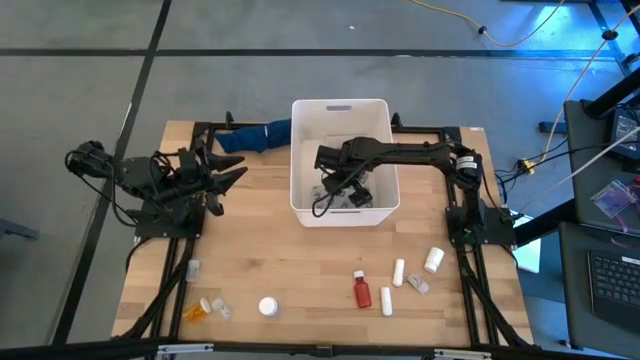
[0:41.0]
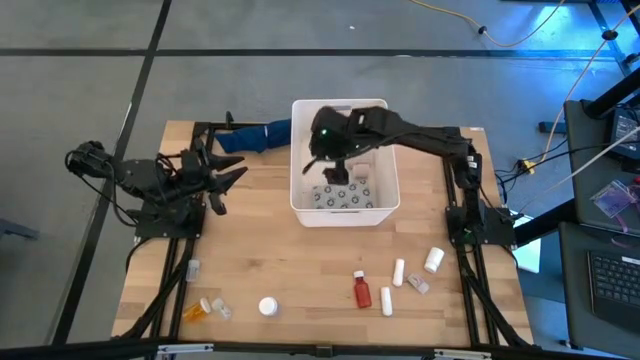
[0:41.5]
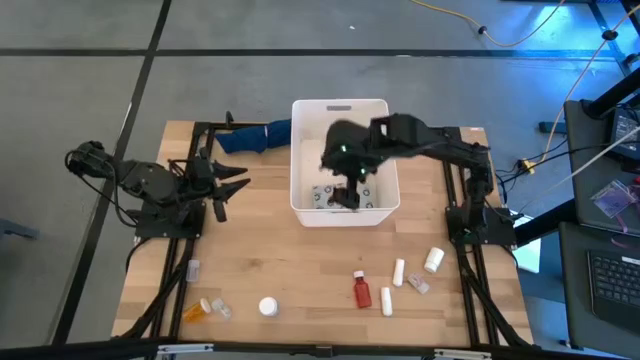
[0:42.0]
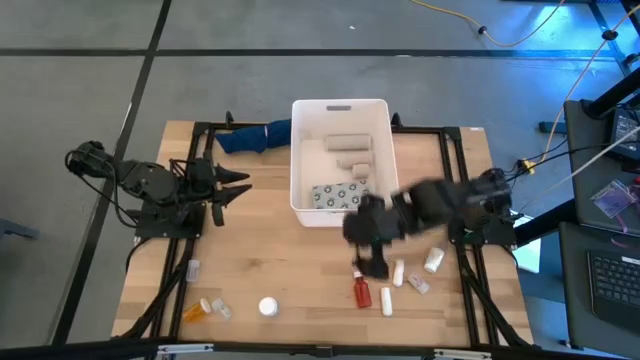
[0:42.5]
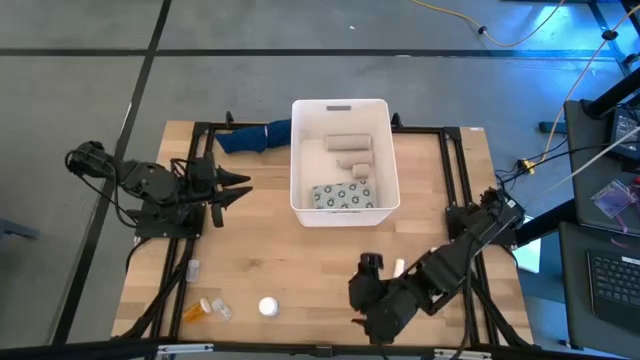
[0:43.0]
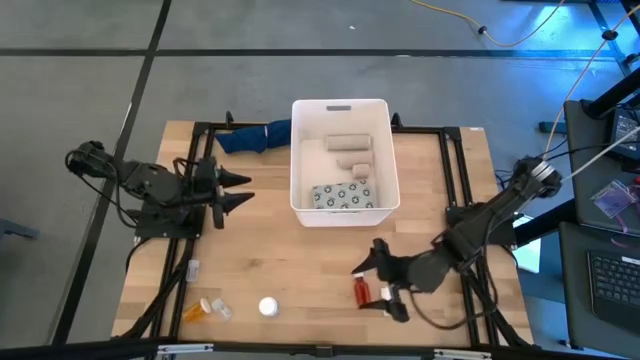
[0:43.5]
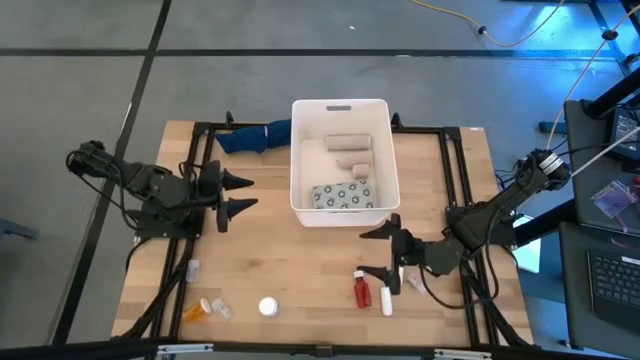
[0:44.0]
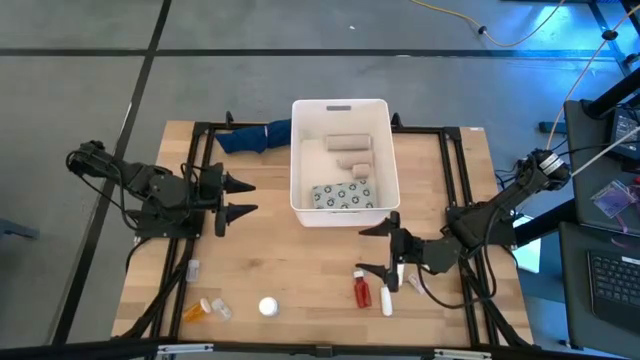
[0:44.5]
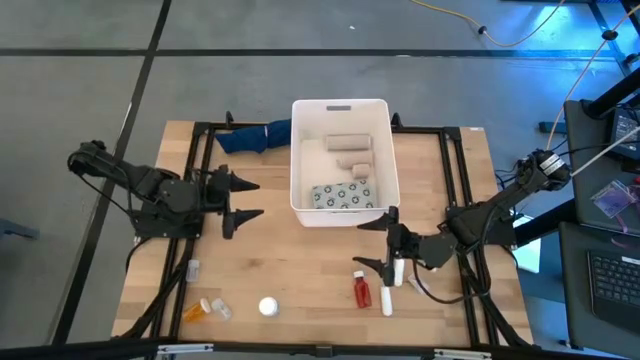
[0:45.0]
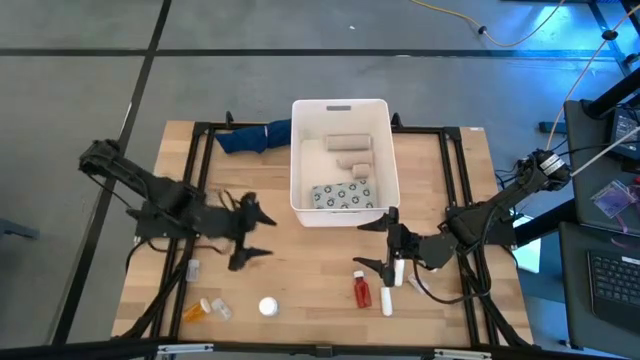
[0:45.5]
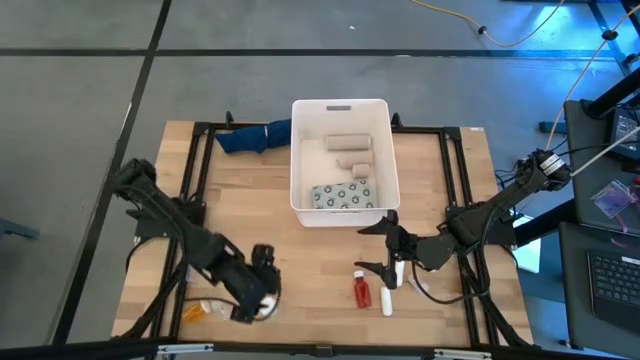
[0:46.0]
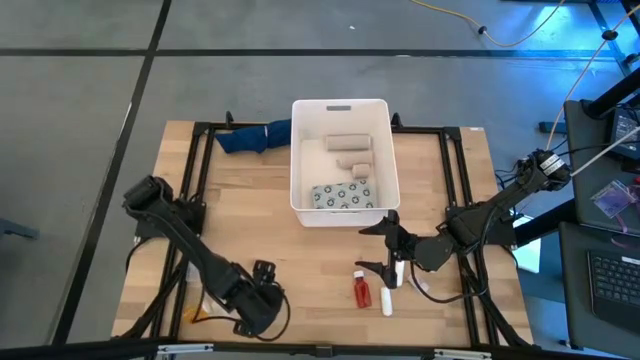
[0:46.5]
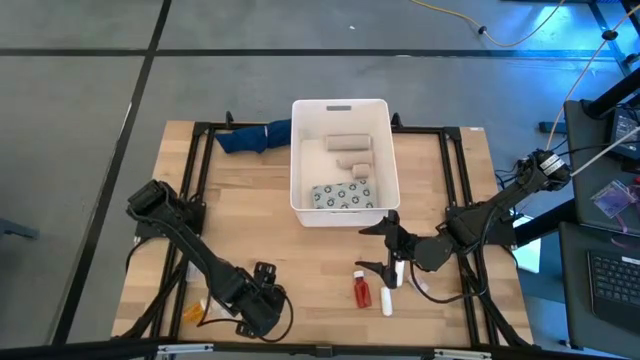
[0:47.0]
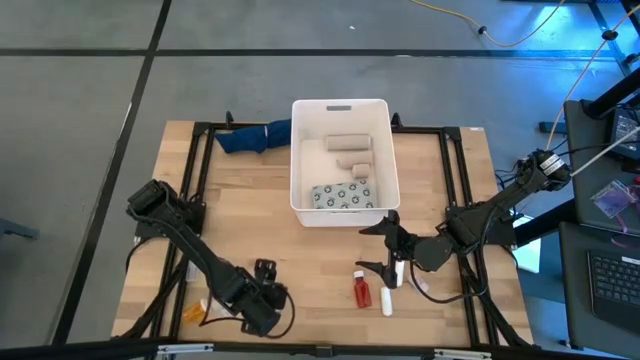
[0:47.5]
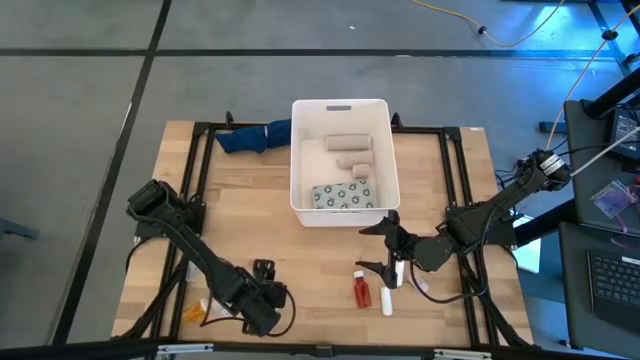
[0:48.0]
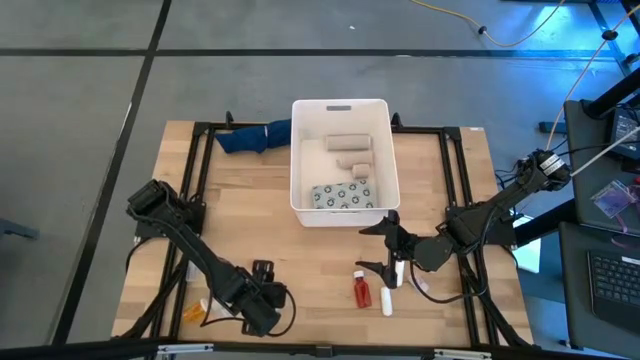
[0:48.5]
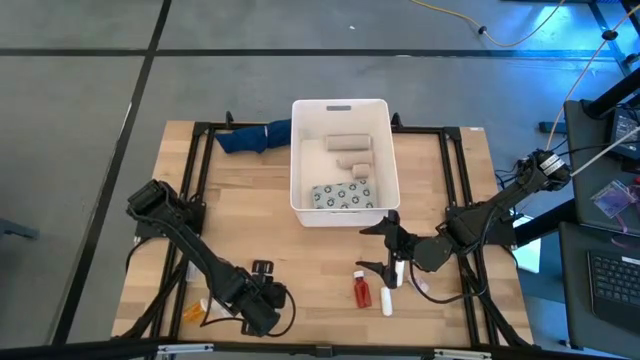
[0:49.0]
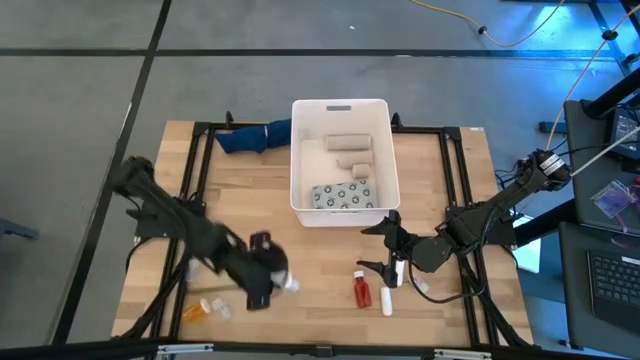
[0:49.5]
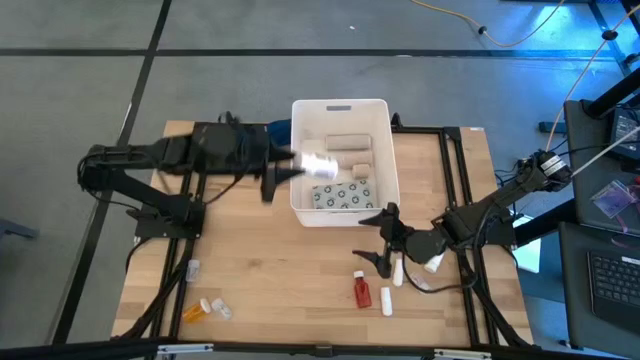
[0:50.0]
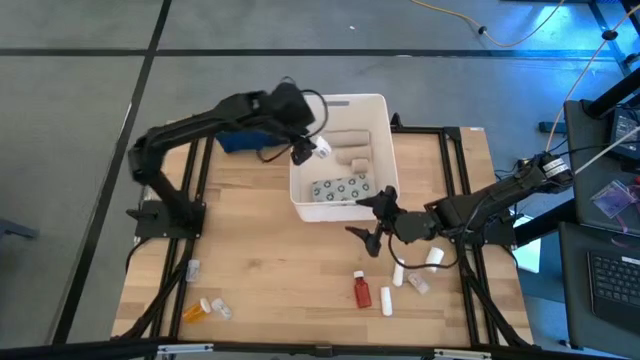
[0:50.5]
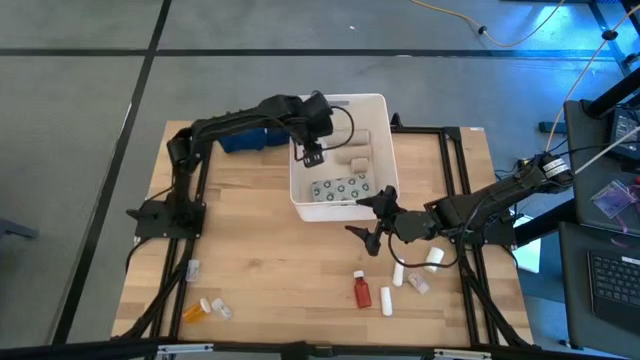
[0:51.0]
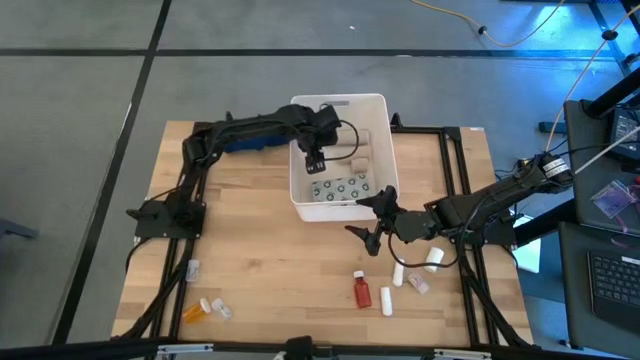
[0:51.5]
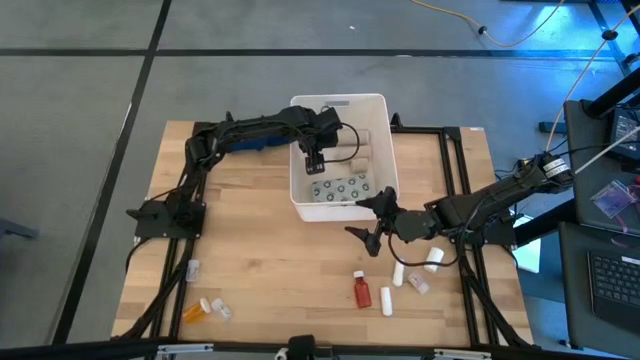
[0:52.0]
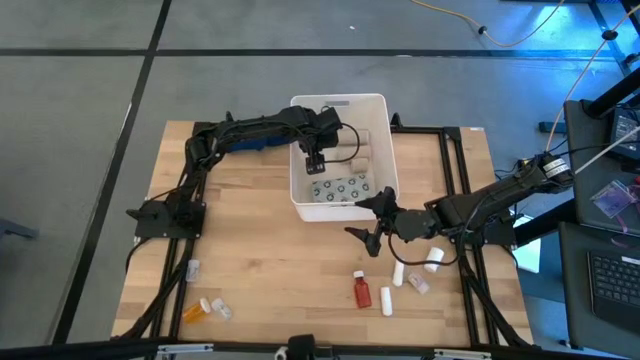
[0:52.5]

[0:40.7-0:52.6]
Task: Pick & place medical supplies in basket/bin
Put the left white medicine bottle into the bin

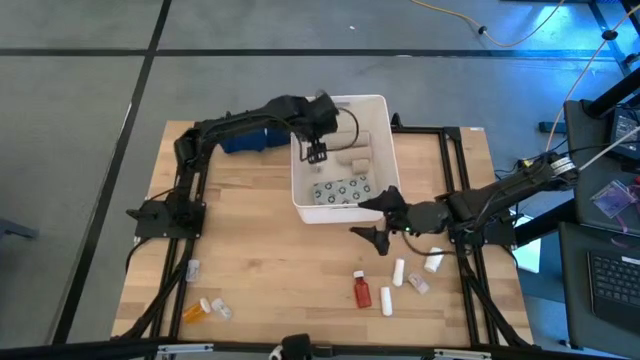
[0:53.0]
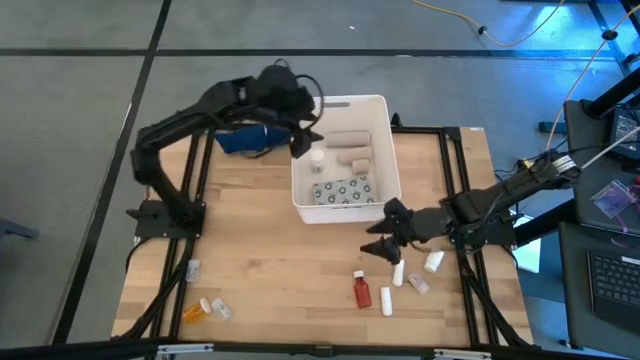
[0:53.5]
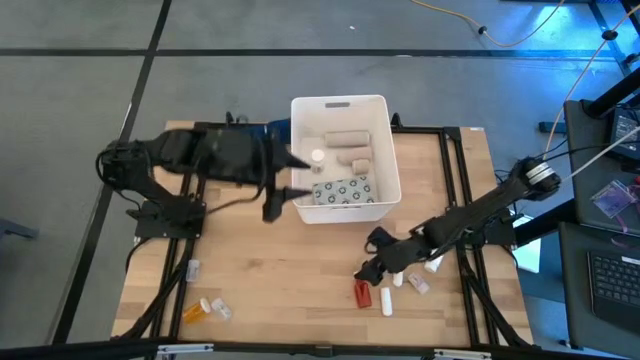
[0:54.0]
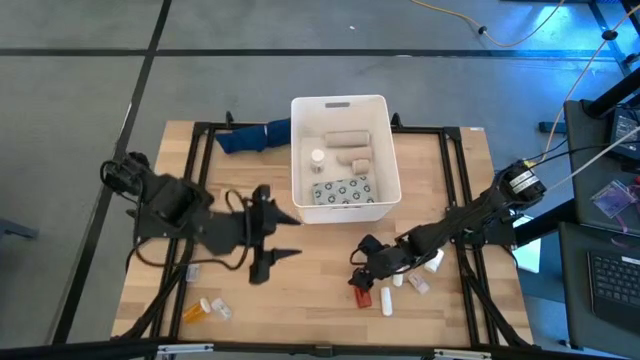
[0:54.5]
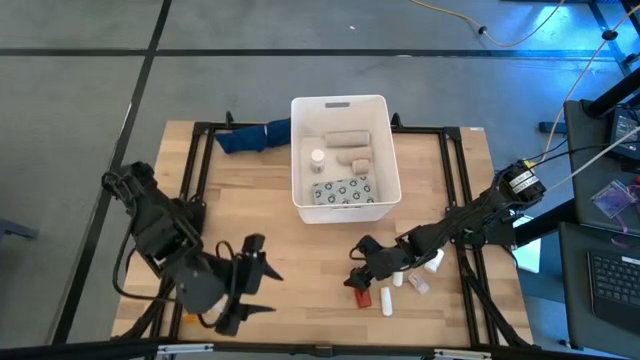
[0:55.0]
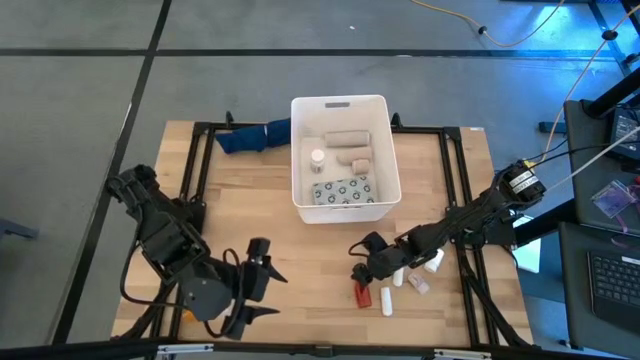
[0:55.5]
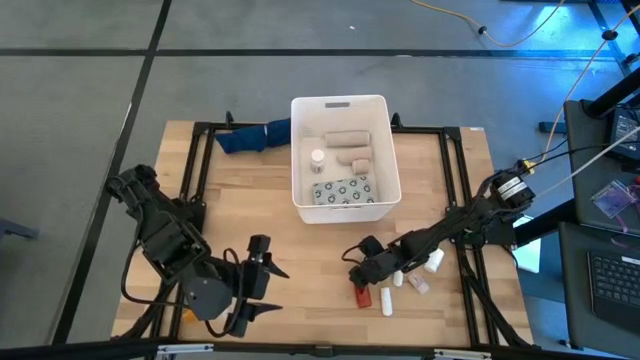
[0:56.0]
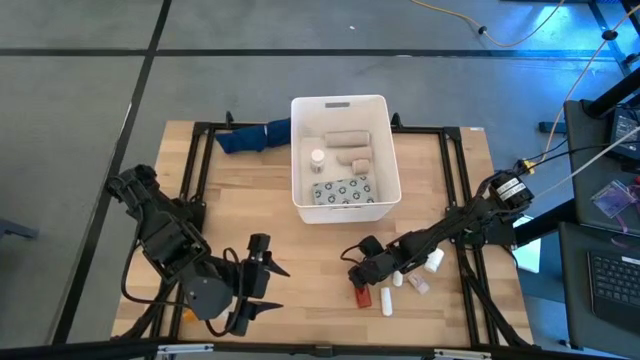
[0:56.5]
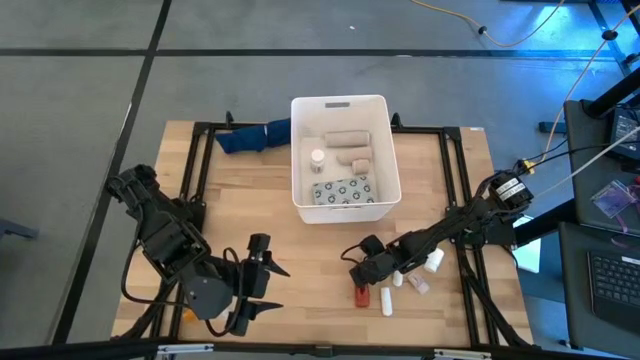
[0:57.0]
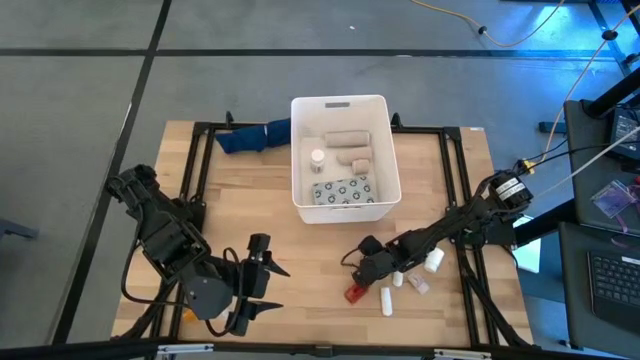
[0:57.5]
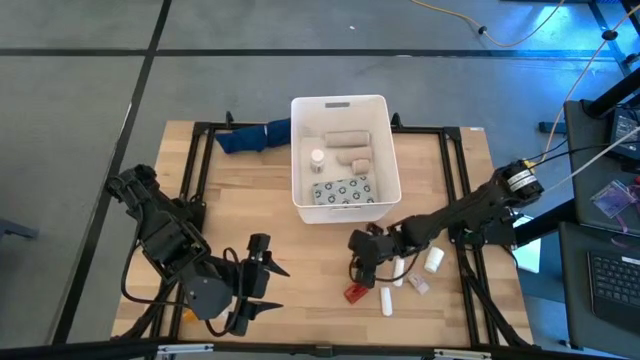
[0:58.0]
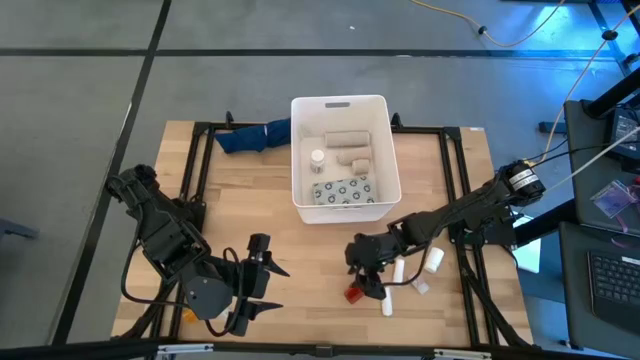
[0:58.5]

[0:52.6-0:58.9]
Put the red medicine bottle into the bin
